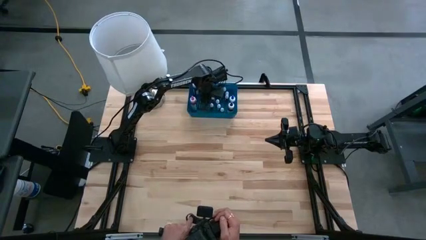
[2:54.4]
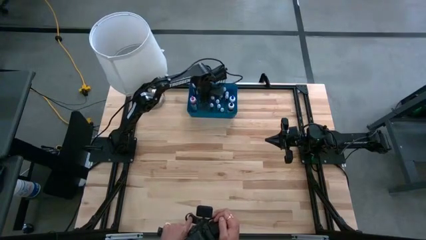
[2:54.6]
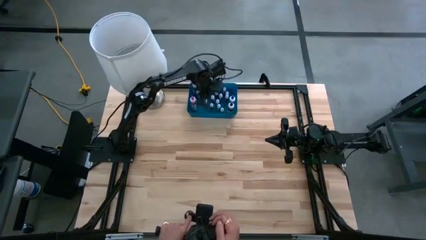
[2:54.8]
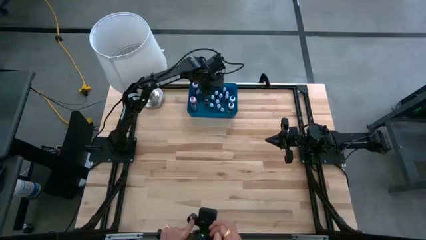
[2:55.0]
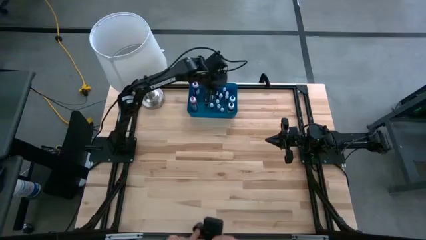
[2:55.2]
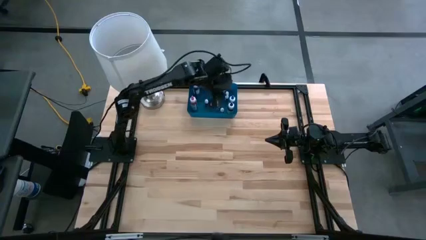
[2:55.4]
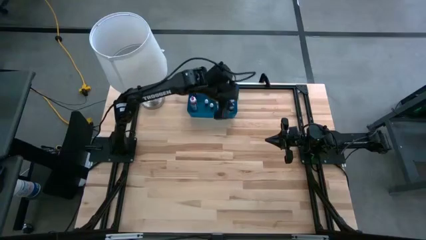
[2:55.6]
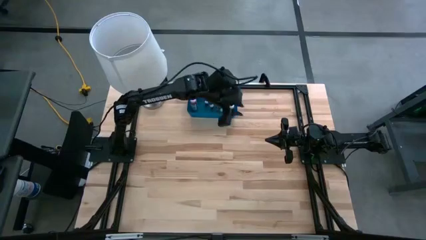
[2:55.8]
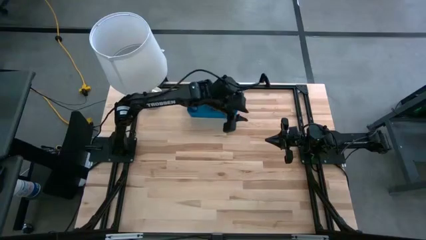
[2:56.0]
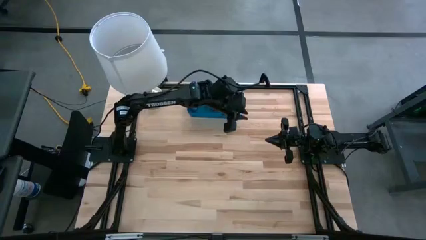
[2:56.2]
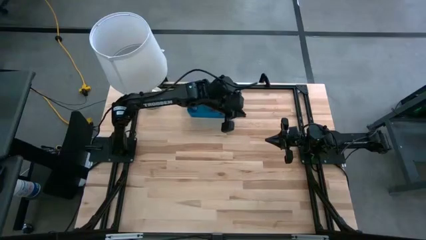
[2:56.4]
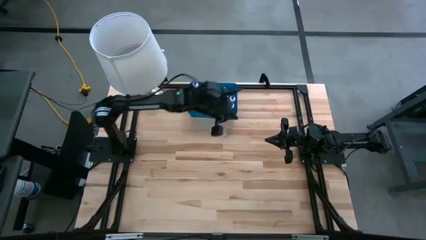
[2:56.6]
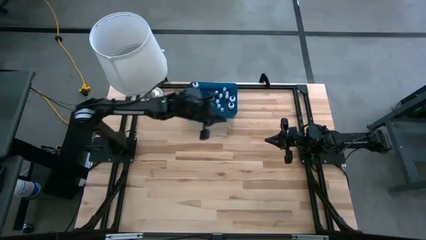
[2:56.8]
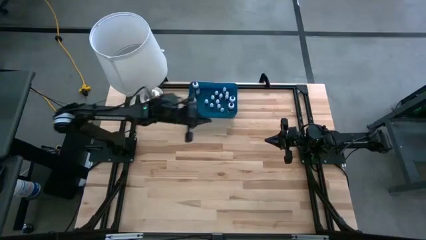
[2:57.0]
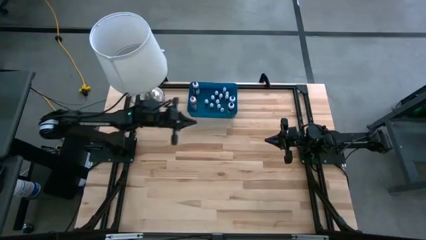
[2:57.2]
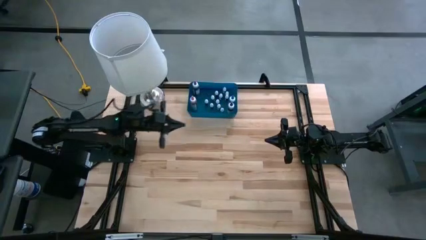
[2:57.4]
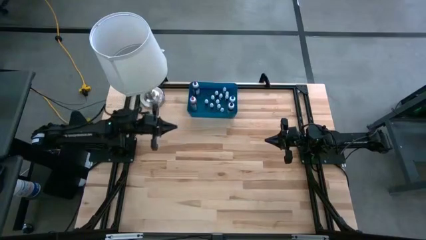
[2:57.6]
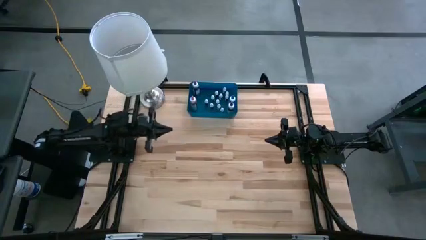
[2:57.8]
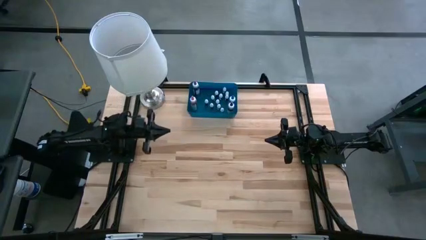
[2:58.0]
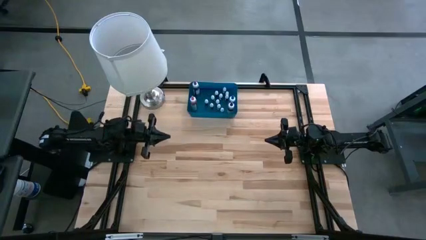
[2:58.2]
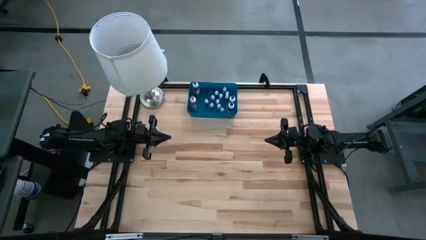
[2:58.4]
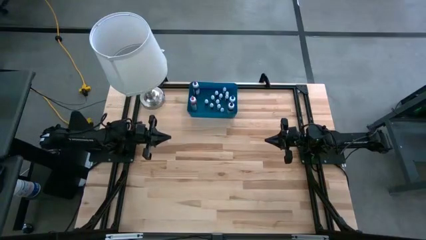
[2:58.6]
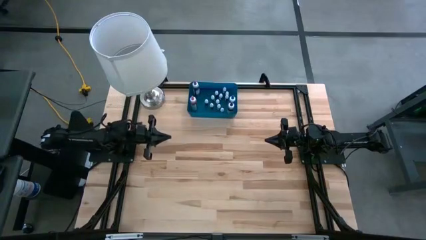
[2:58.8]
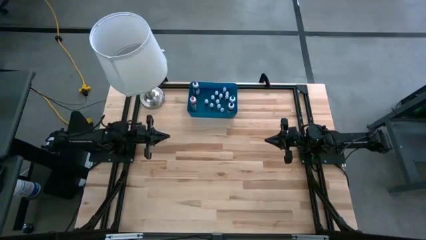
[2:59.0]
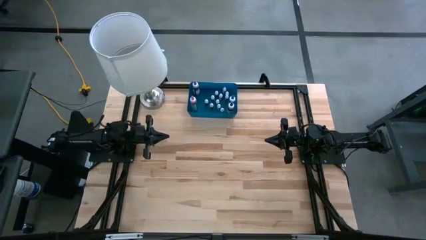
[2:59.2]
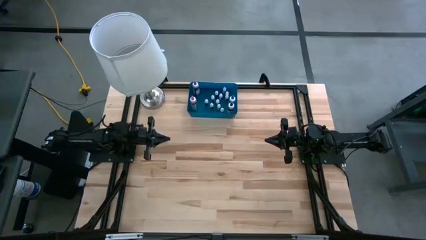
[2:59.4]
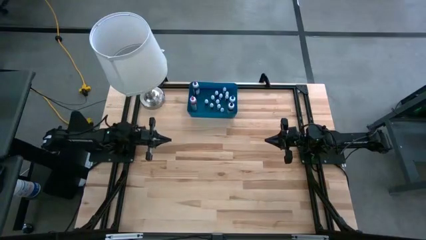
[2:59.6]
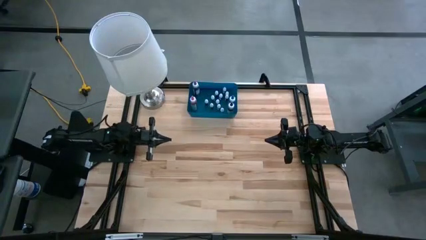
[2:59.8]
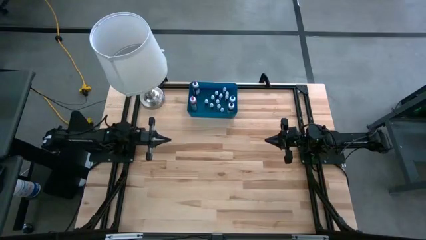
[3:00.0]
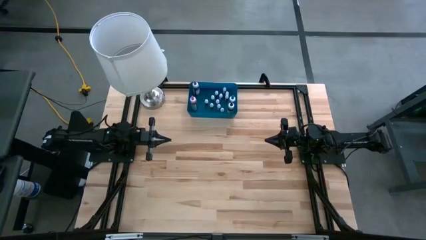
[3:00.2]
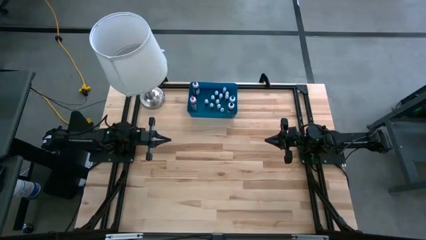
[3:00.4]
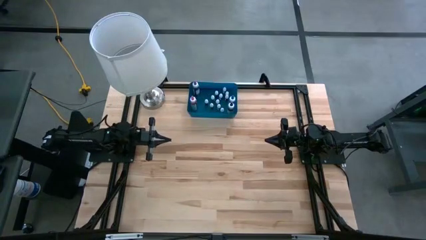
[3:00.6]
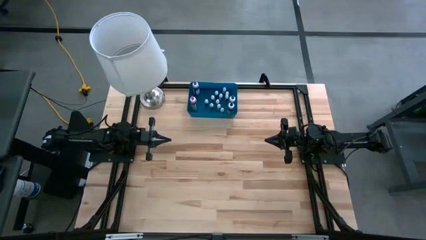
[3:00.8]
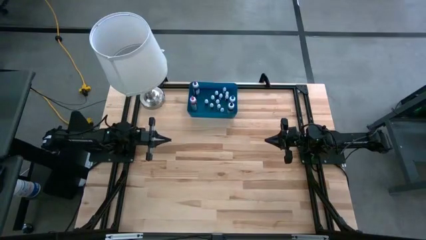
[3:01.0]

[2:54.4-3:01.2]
Task: Pick & Place food coloring
Return to Home Position

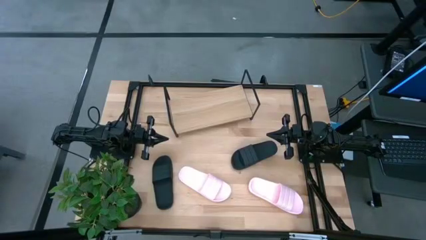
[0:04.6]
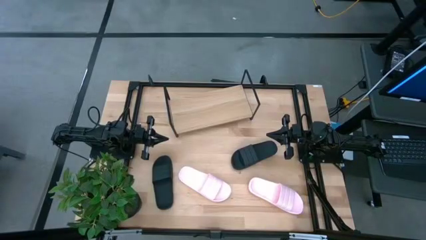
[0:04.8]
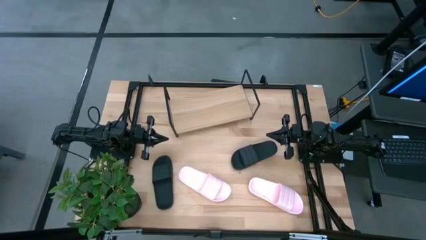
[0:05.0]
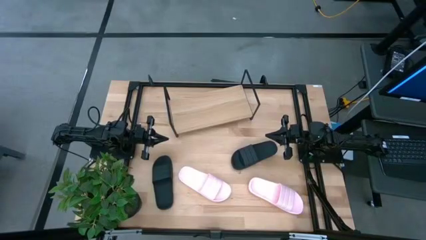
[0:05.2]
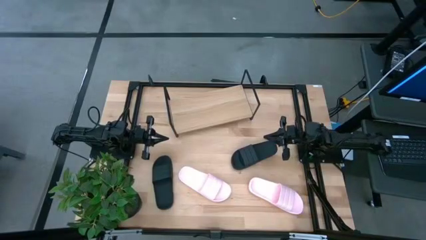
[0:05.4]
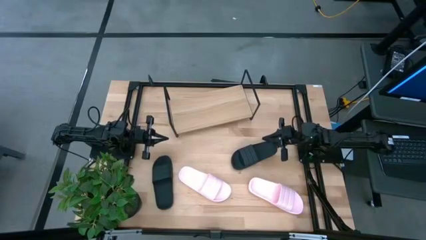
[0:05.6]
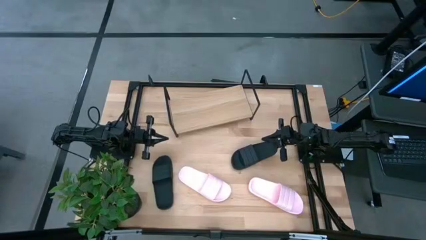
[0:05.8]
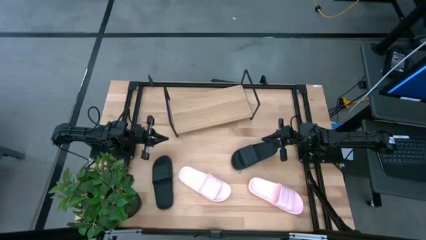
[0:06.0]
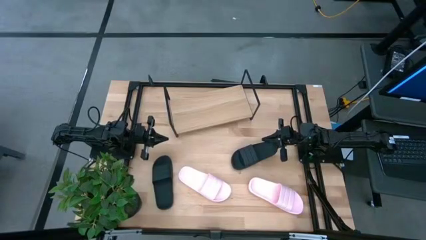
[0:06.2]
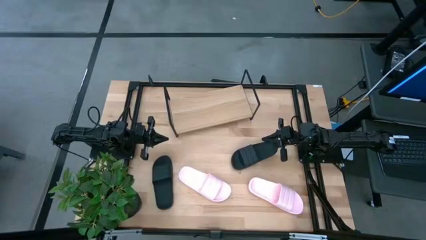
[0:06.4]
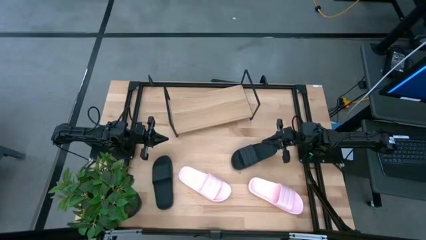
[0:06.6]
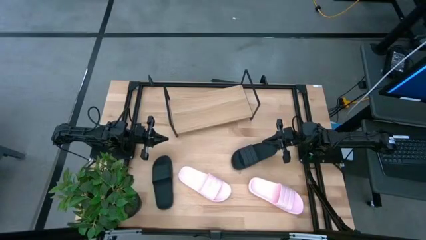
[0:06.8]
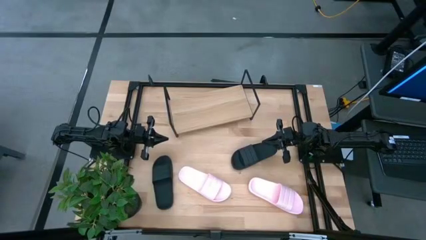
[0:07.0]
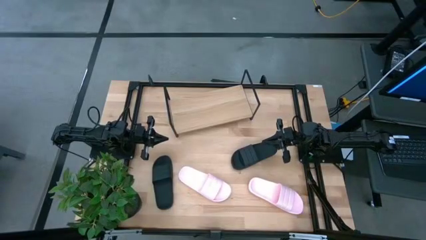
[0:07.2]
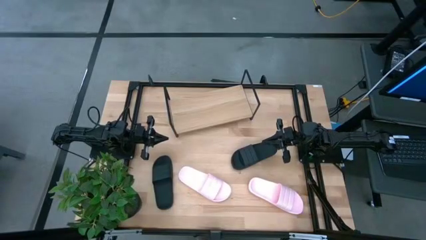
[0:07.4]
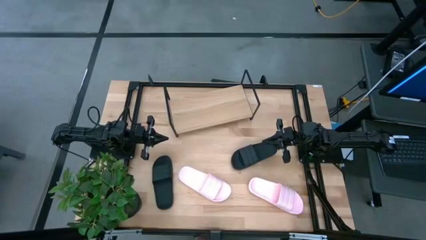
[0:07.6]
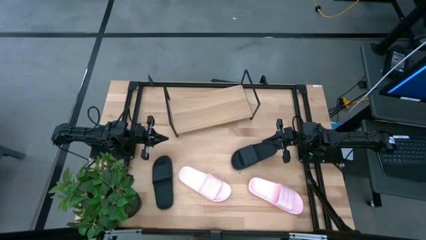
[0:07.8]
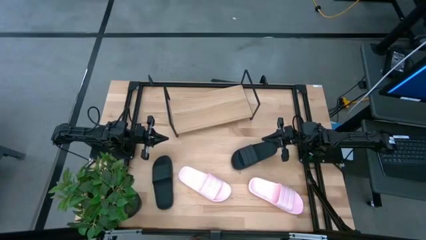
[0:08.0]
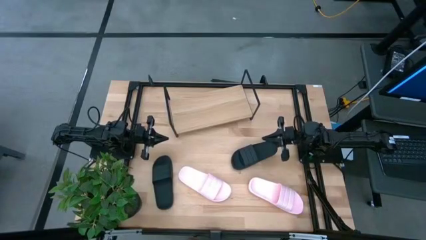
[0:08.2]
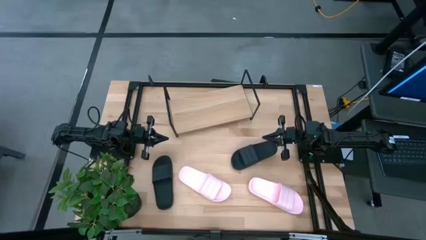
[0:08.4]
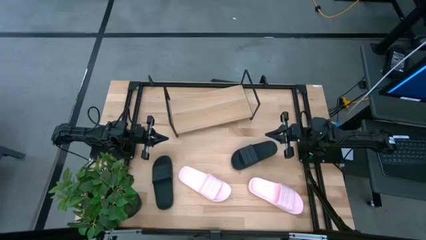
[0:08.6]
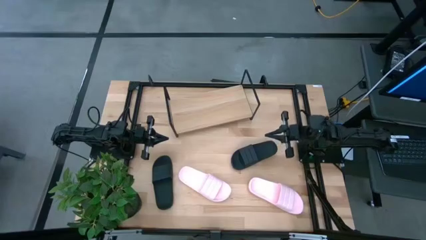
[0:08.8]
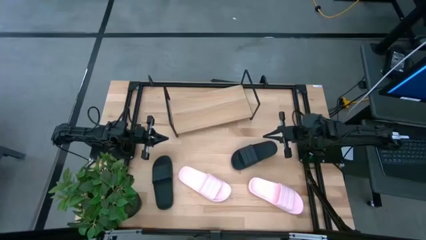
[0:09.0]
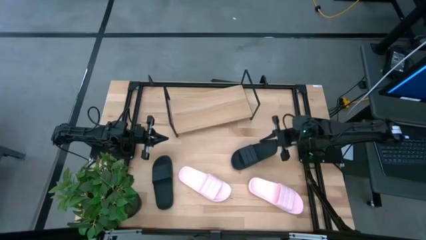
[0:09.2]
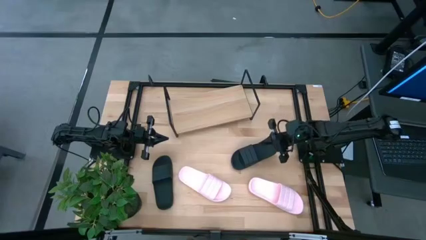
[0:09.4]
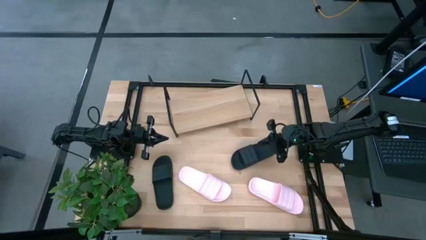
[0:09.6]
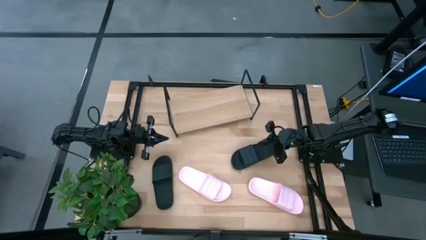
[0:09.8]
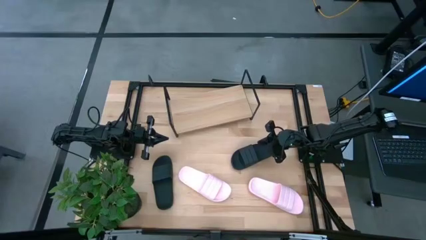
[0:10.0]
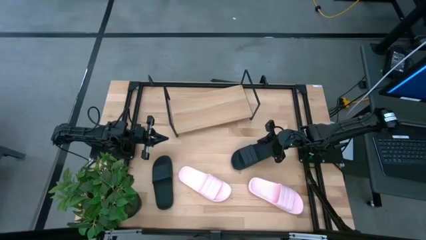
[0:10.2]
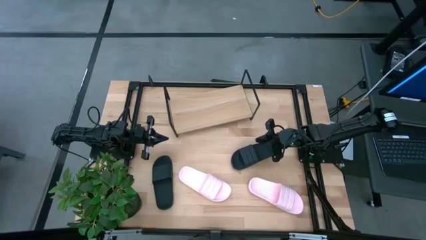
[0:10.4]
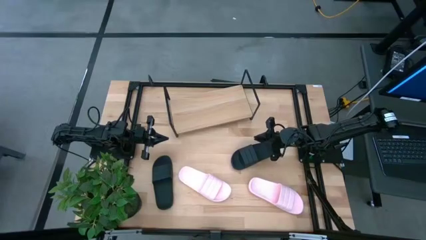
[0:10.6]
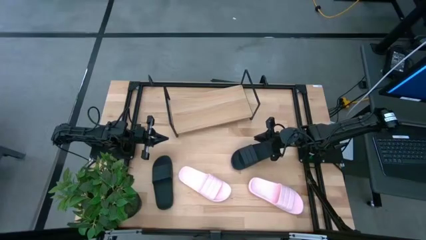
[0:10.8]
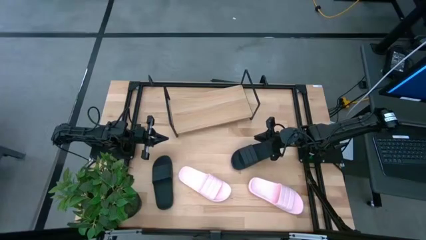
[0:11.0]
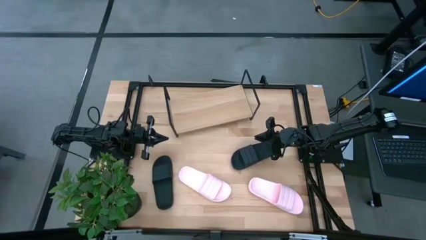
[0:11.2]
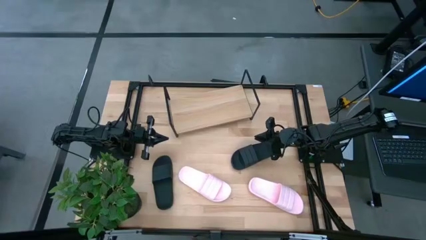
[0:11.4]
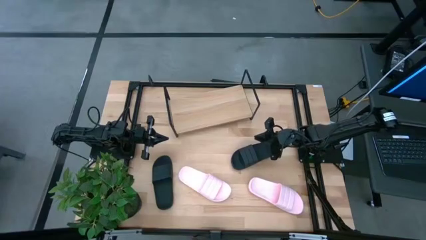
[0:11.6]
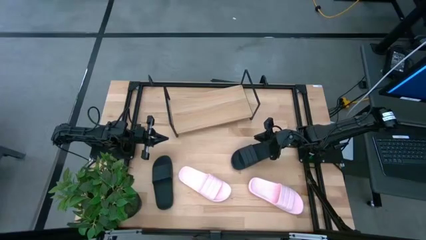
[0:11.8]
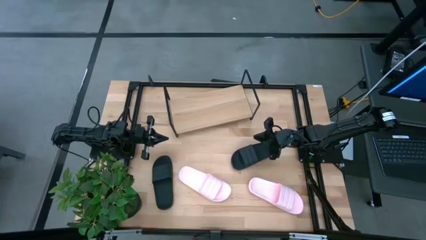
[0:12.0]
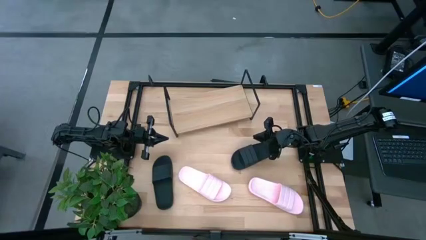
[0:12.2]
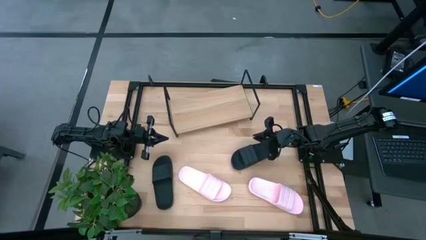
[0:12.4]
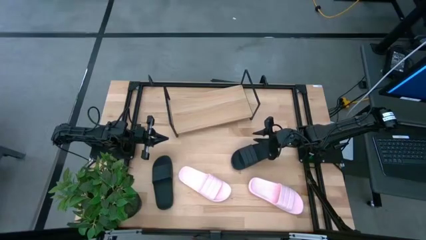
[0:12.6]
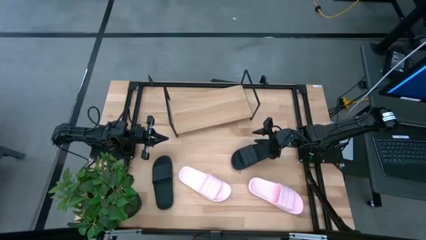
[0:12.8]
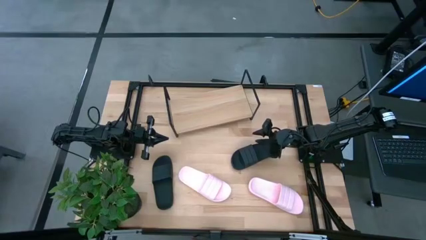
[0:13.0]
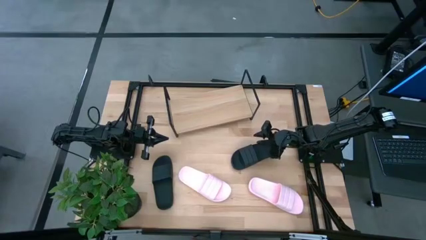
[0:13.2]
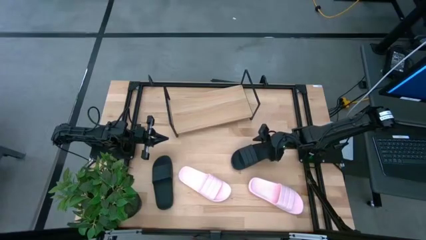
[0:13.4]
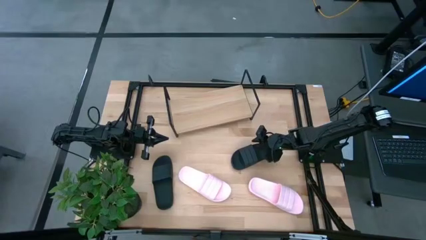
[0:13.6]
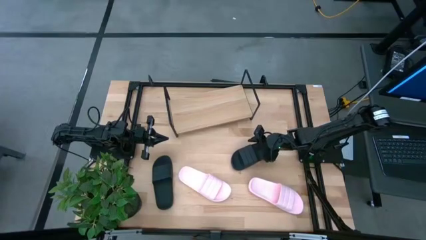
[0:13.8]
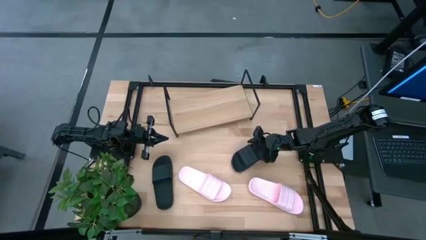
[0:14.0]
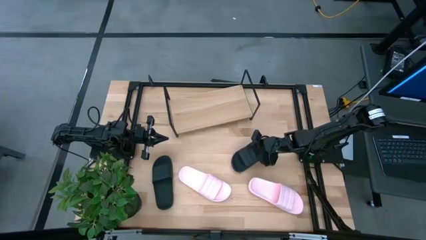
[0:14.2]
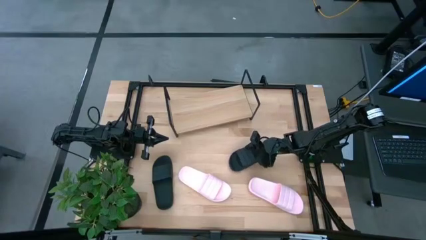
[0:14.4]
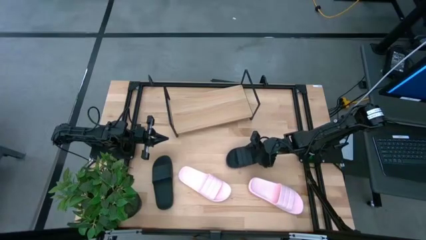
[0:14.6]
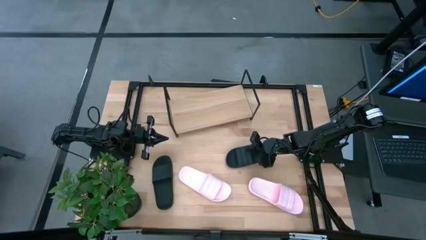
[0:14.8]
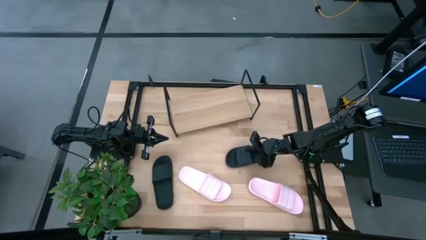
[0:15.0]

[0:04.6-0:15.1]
Task: Pick and place slides into the shelf
Put the right black slipper on the shelf
